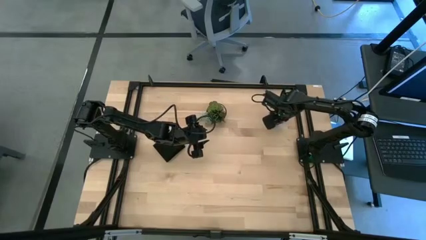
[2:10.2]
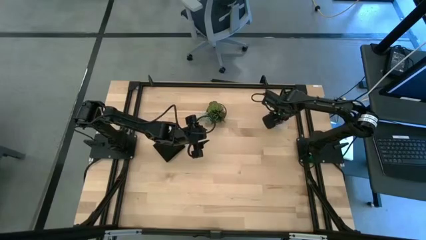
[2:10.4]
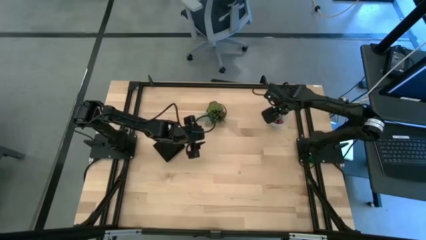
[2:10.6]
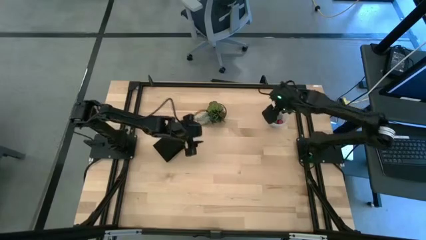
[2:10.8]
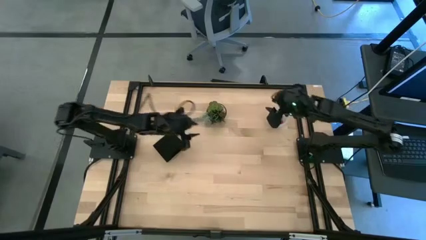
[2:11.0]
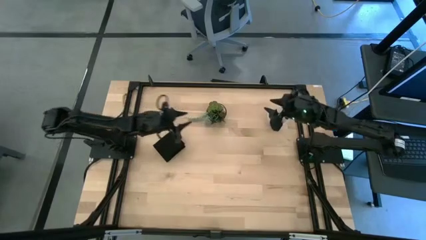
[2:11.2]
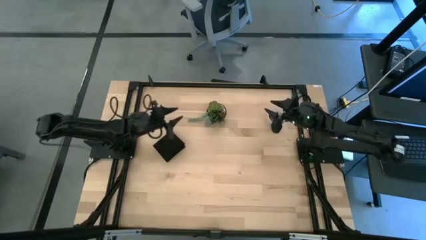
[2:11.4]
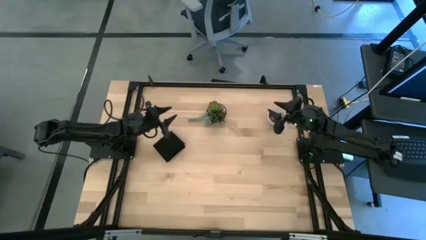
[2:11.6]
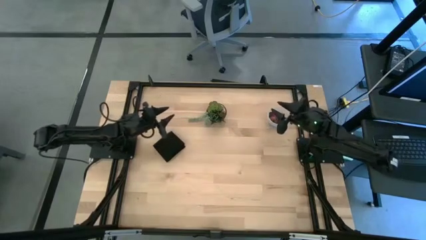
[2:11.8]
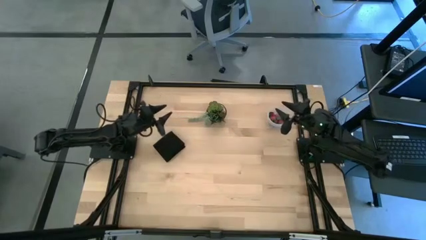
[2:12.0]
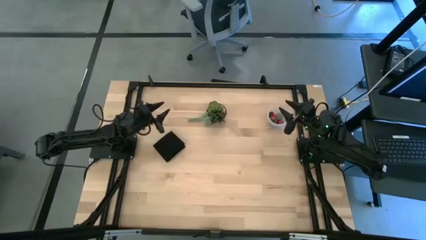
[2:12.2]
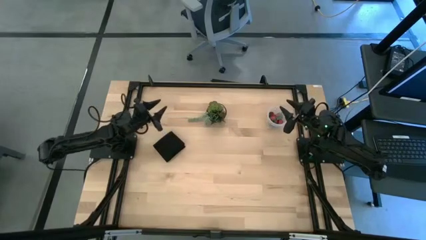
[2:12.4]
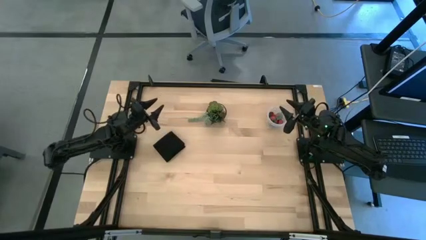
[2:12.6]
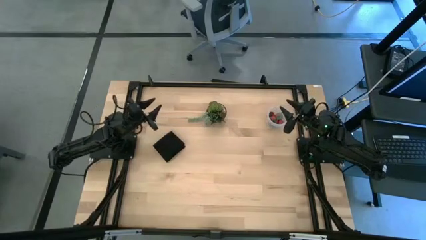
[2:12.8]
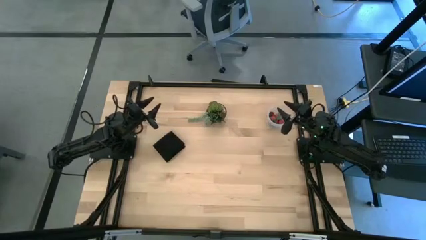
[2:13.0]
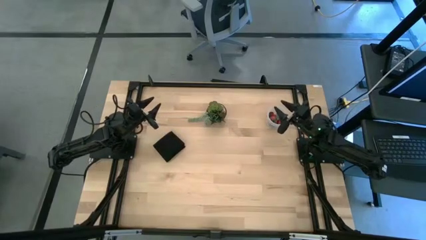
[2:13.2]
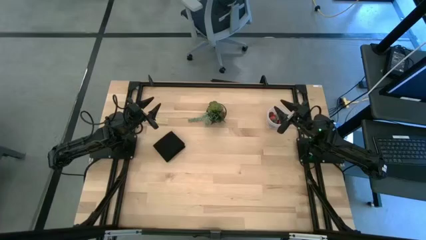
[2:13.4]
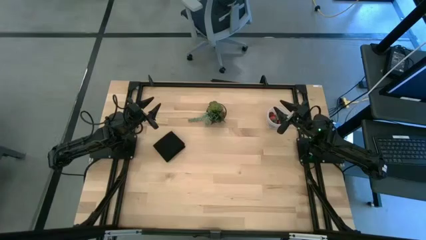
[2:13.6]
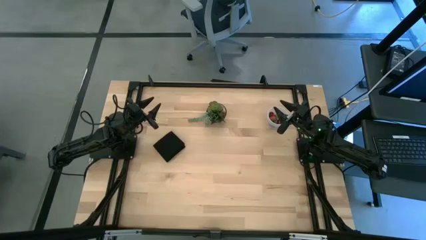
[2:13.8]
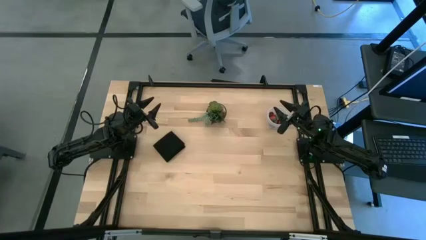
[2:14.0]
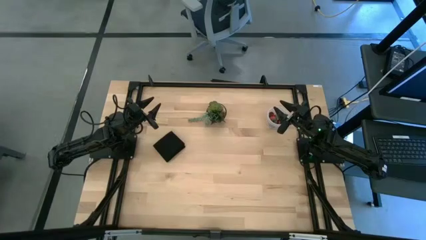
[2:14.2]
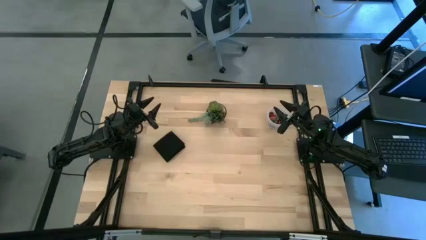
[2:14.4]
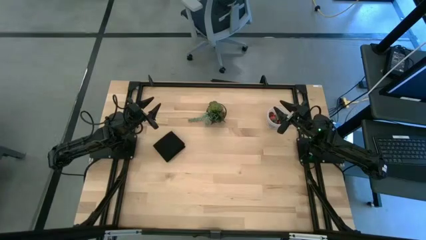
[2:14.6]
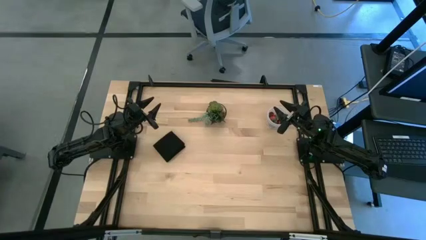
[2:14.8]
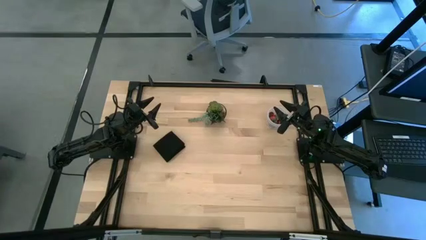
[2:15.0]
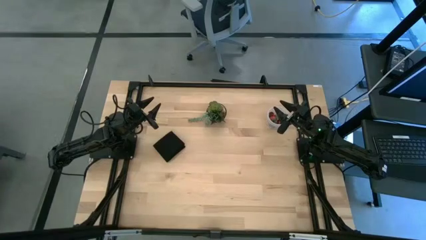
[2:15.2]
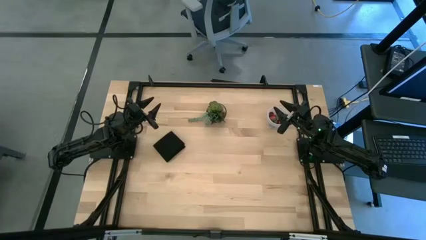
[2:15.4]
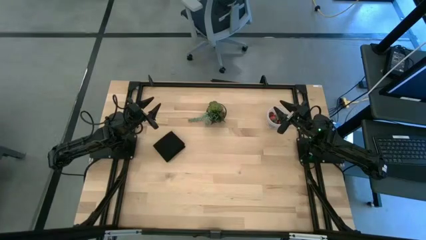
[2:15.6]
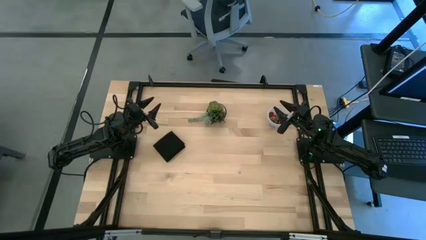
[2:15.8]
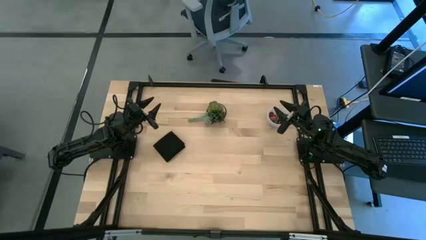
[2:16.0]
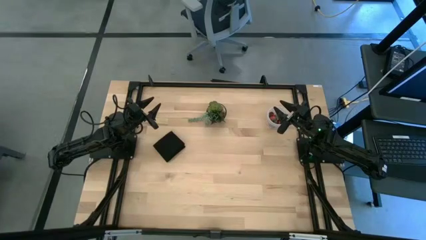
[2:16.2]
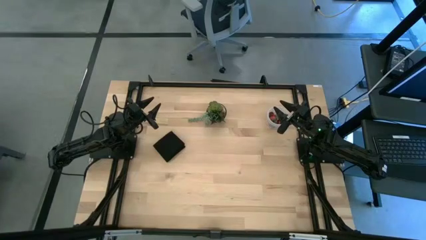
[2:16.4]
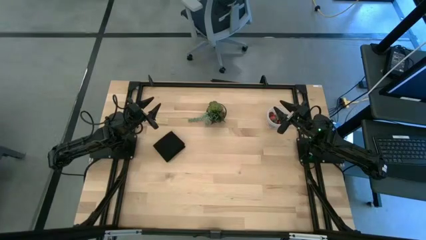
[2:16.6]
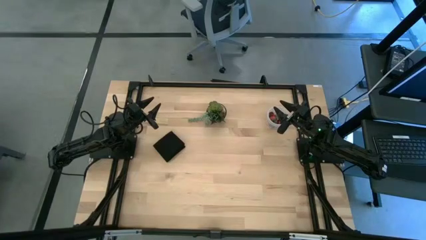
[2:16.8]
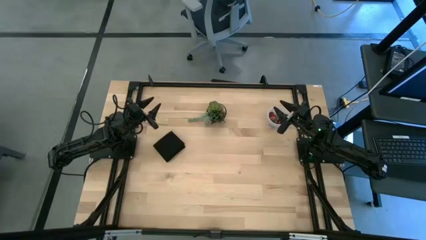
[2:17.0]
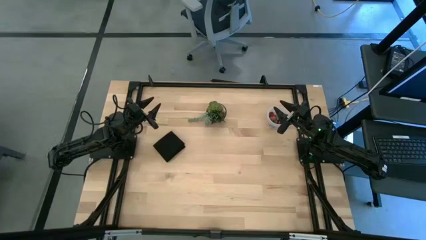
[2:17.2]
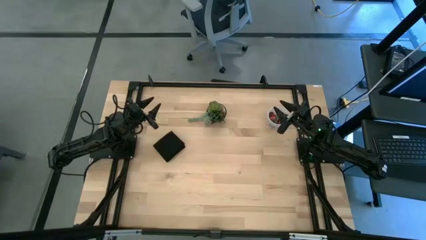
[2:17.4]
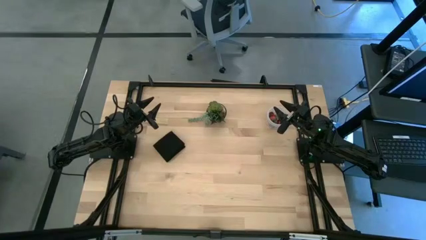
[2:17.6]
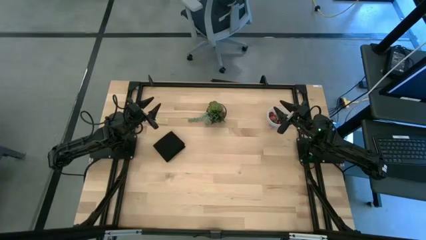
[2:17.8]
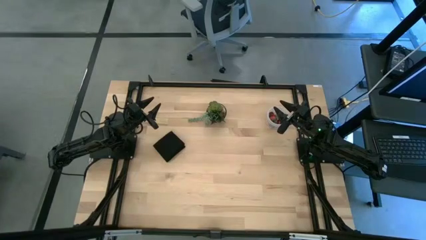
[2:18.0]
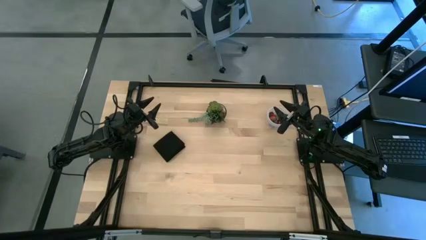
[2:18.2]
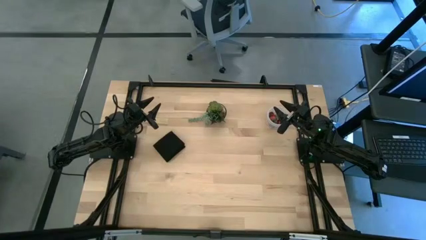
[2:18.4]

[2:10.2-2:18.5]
Task: Pick and placing Produce into tupperware
Return to Home Position

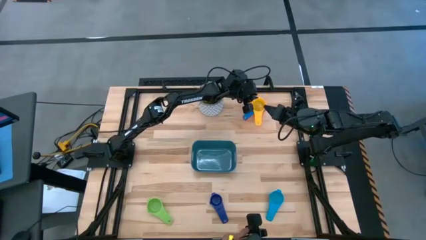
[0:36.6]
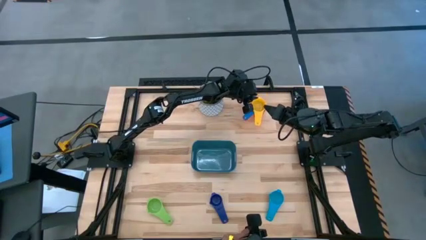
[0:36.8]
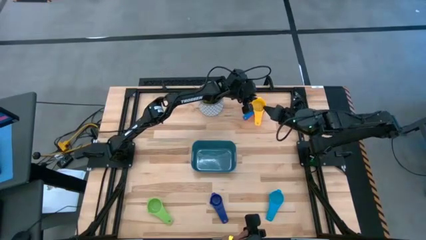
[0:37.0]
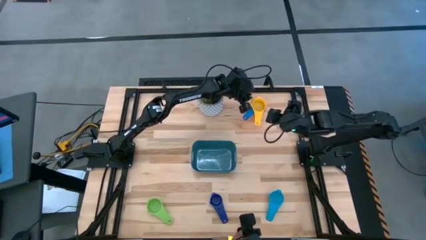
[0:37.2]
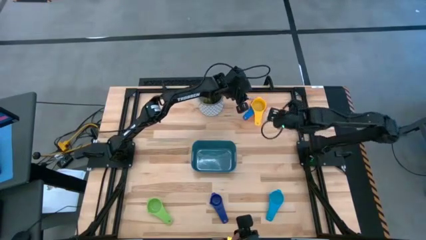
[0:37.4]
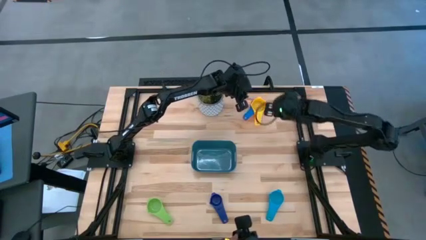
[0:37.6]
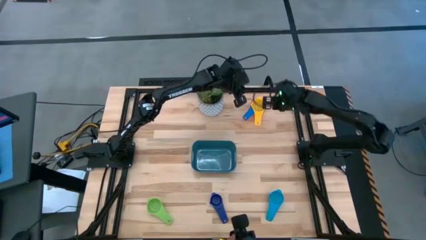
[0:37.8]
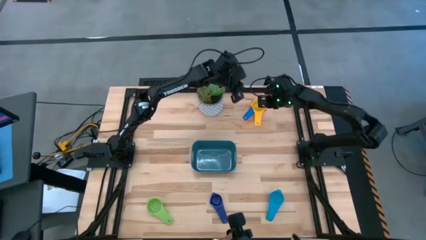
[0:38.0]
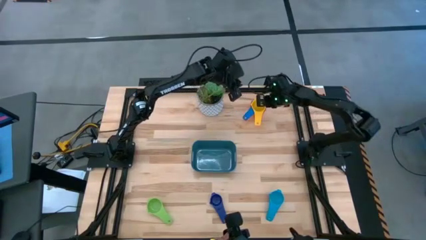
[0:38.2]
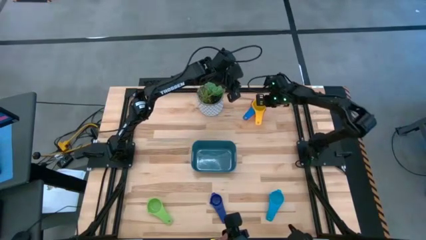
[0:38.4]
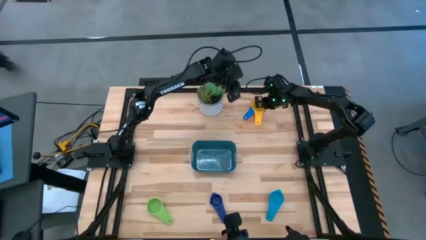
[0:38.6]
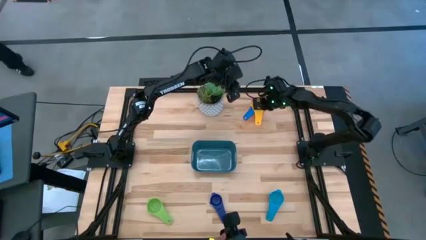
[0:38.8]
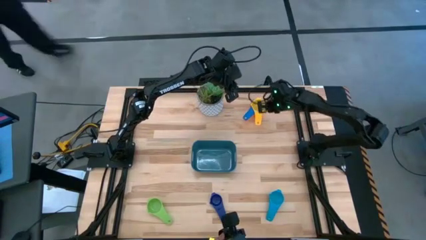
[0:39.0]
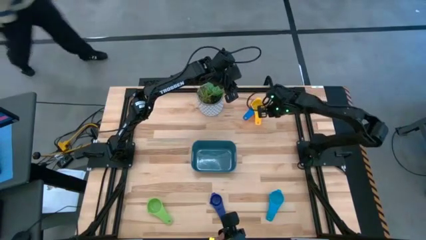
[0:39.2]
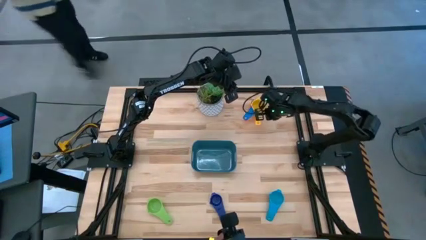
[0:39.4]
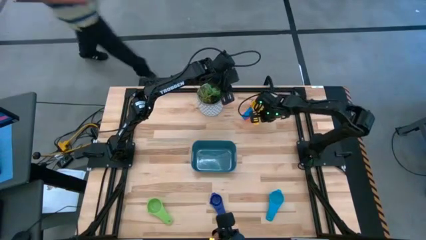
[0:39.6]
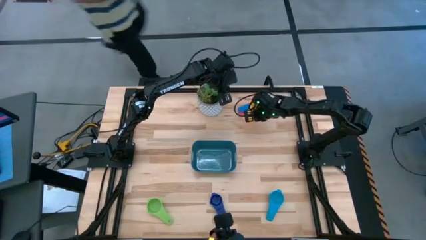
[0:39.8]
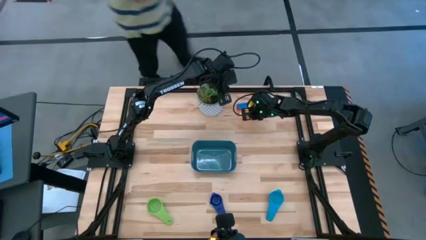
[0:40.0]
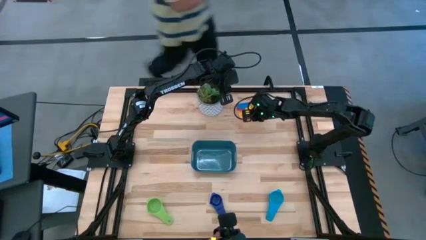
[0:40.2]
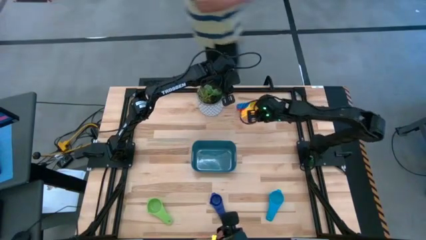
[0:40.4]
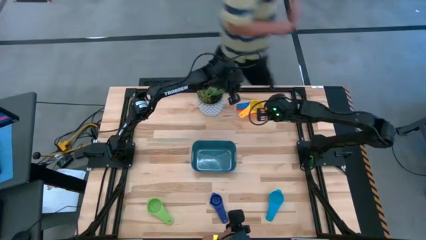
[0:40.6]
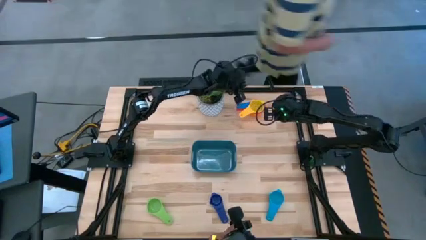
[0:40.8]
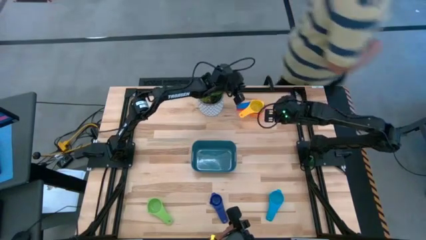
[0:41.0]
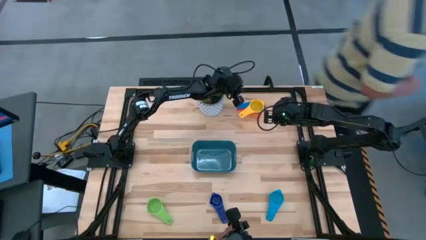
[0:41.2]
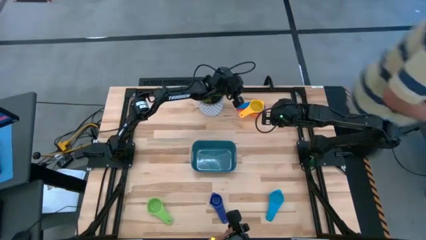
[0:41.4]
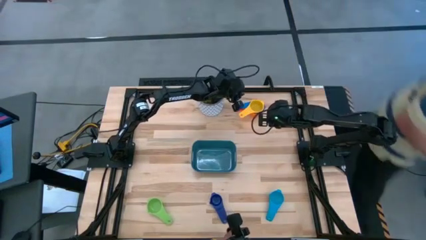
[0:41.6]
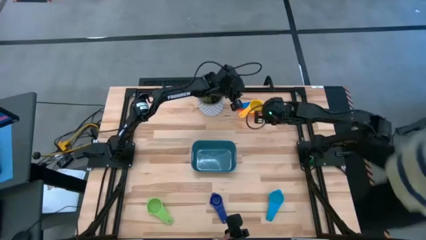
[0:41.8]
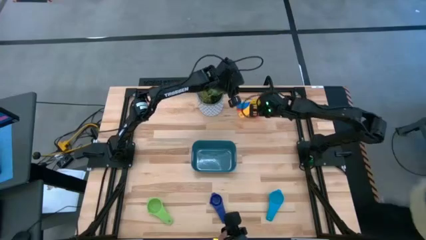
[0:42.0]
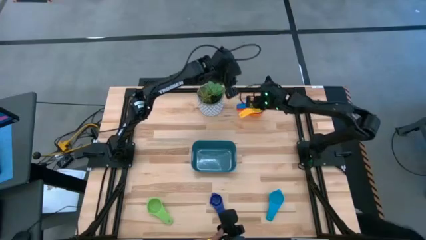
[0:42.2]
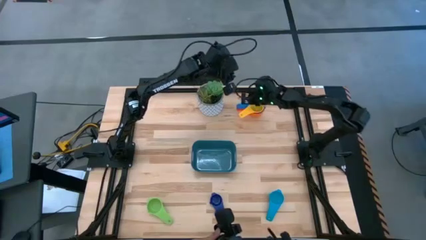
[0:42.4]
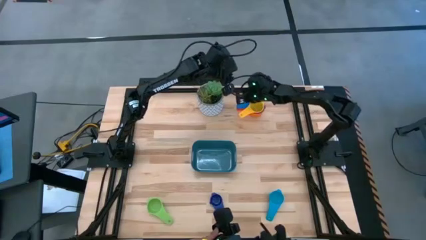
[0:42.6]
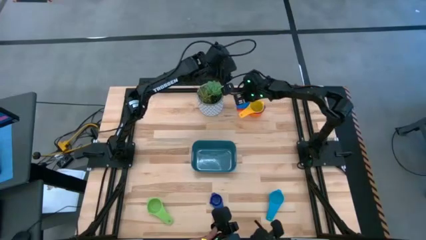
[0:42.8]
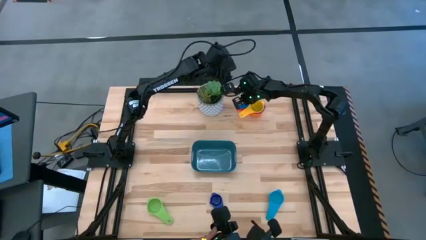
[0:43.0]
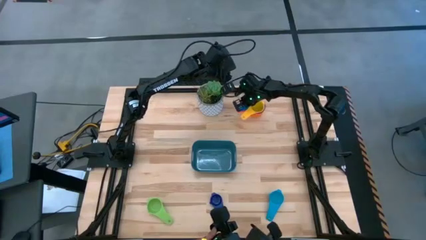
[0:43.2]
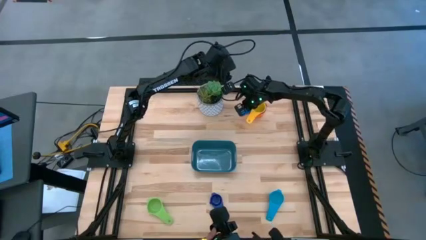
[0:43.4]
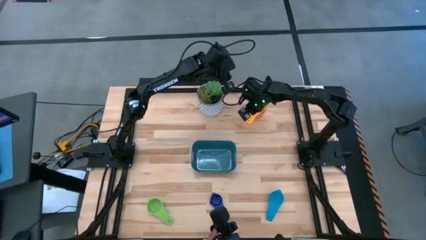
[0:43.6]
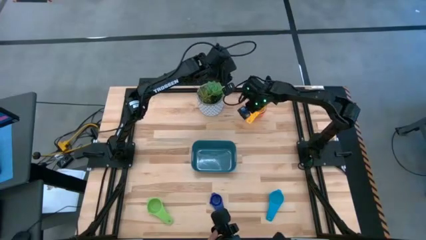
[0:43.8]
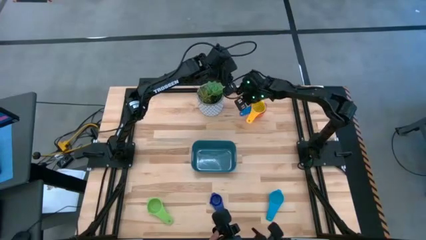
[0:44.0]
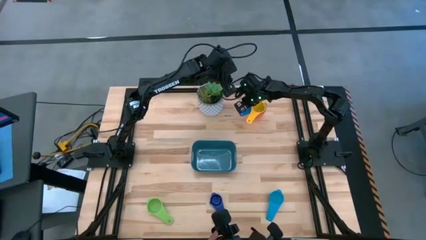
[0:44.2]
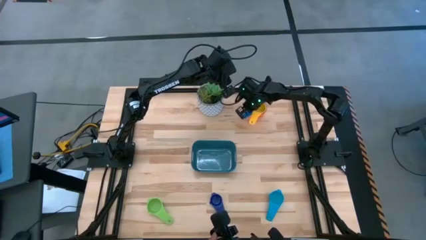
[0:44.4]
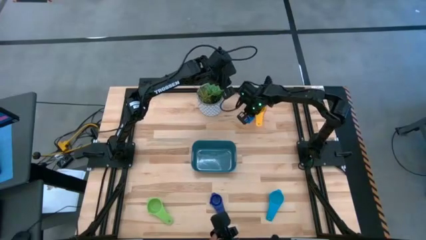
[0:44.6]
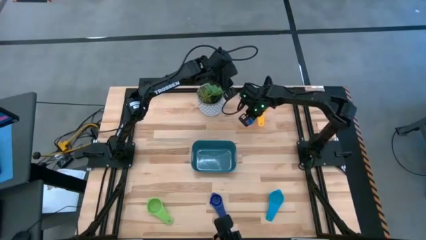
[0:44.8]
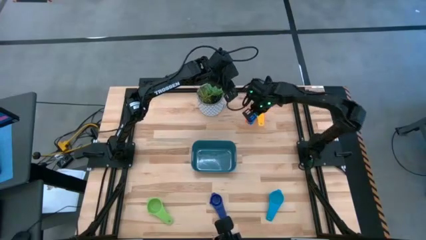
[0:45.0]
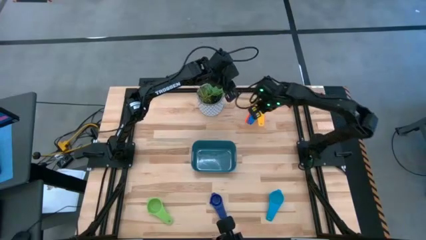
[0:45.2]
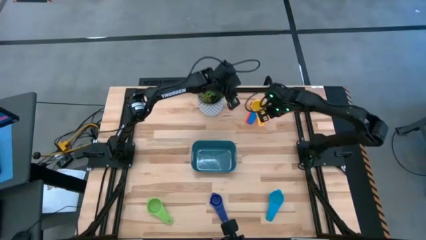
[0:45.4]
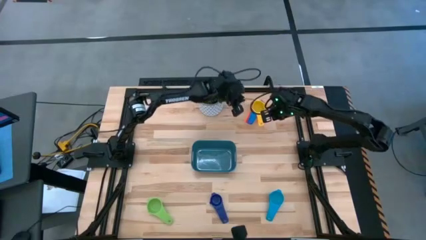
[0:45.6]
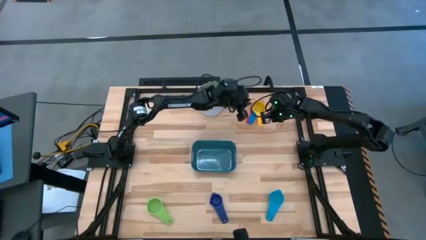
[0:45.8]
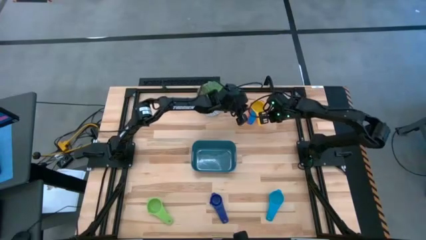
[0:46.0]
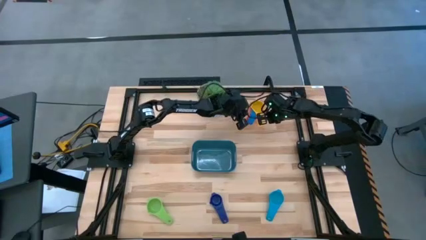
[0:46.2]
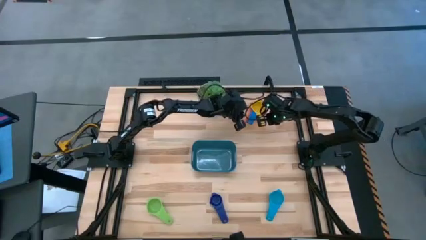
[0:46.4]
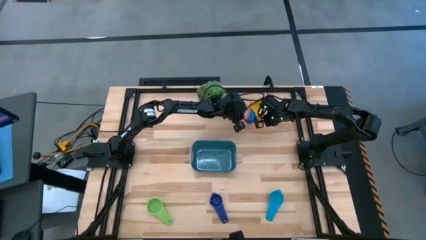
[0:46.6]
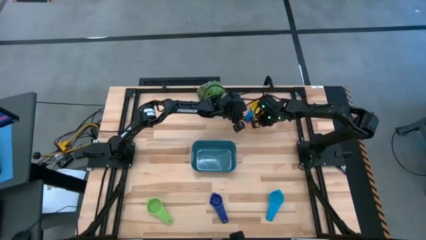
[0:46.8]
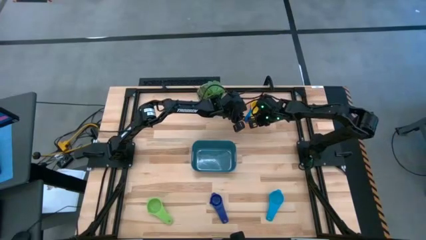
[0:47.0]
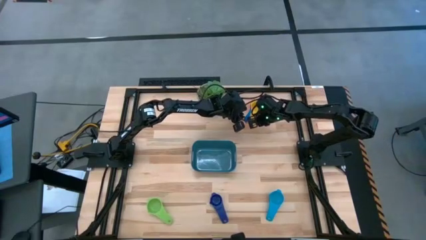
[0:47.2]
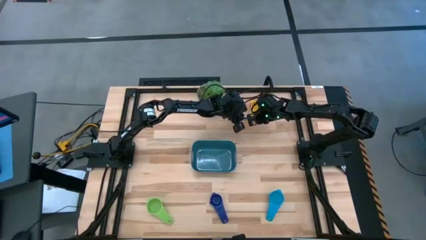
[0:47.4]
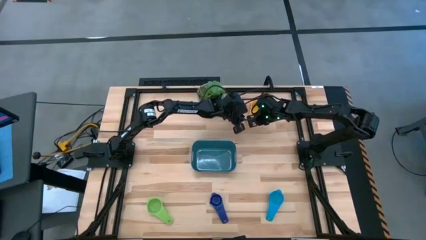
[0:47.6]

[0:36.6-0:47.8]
Task: Nest measuring cups in basket
Stack the yellow measuring cup on top of the blue measuring cup
